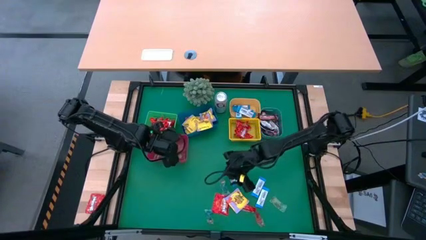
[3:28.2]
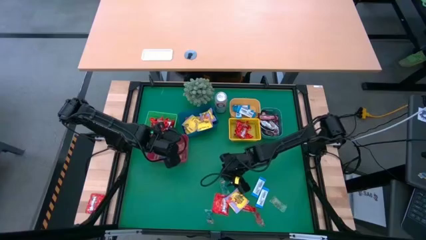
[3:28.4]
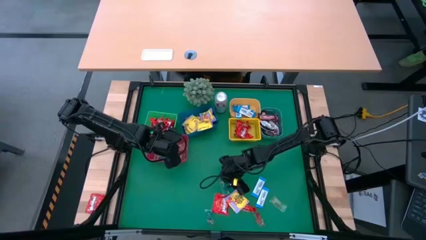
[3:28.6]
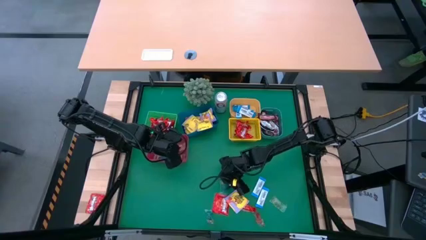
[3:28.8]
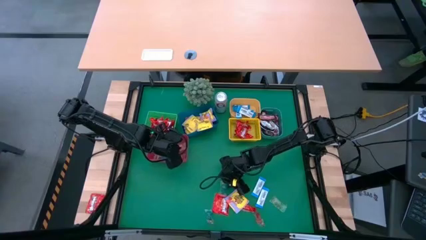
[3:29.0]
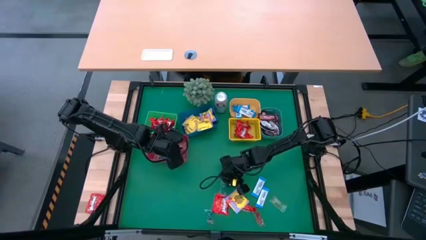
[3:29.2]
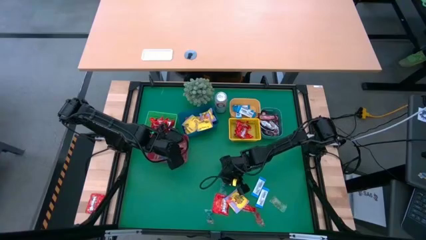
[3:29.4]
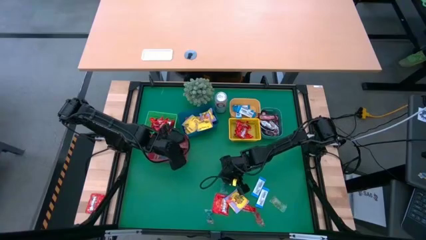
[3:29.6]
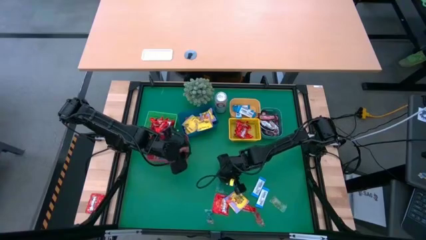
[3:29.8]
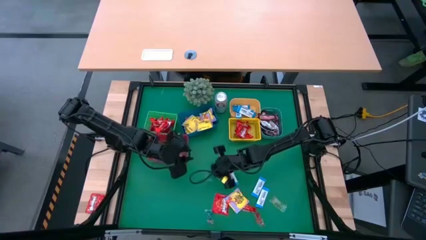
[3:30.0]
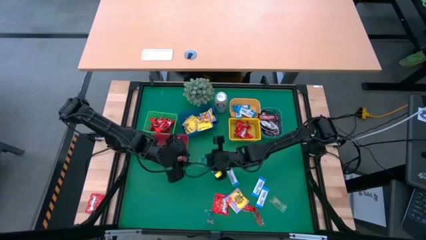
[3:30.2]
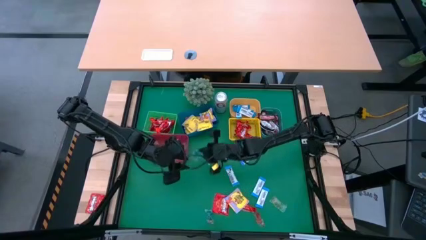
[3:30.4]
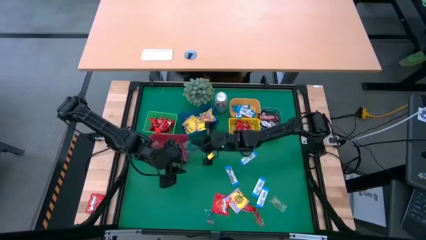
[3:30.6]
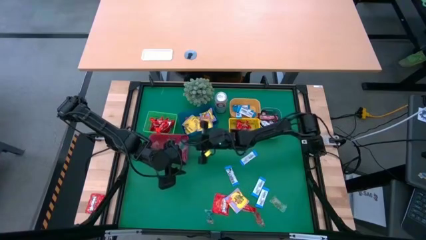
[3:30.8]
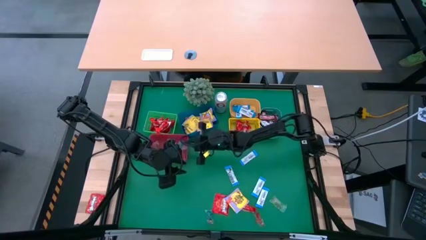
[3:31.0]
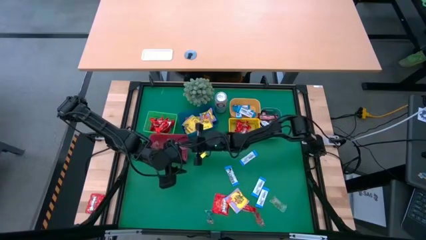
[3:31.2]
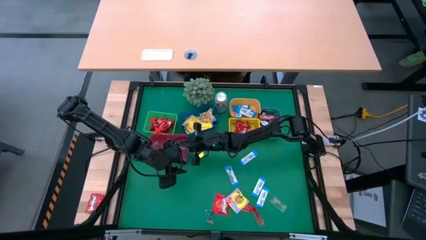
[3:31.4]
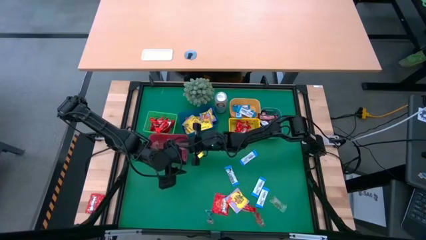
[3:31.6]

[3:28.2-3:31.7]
Task: Sort candy
Put the transparent blue candy pack into the red bin

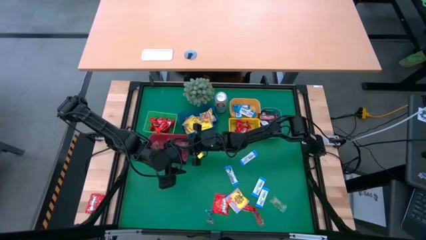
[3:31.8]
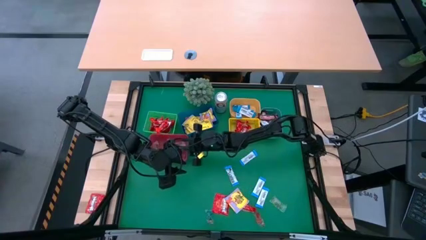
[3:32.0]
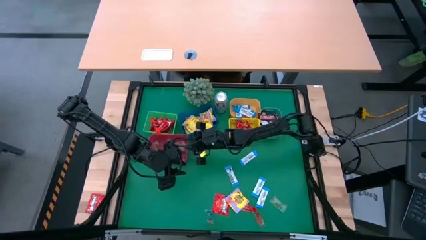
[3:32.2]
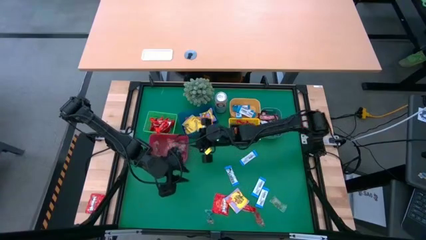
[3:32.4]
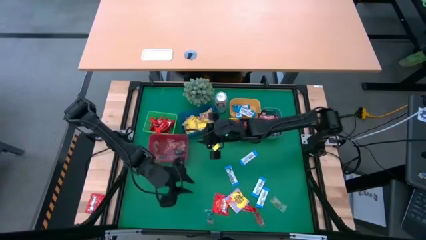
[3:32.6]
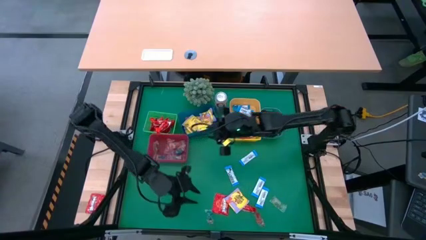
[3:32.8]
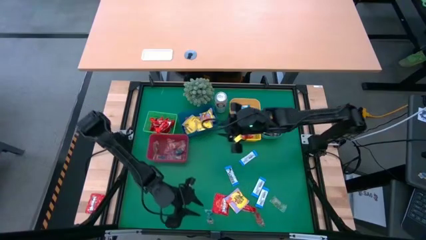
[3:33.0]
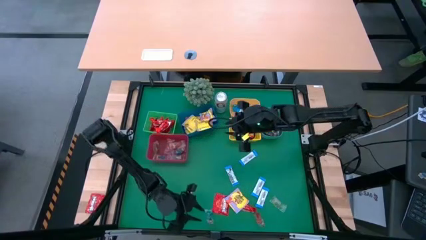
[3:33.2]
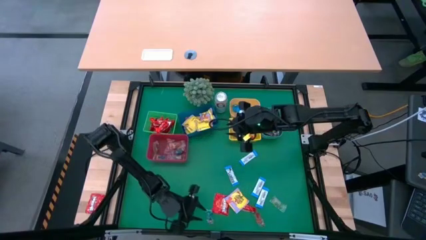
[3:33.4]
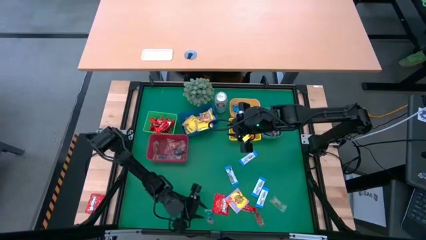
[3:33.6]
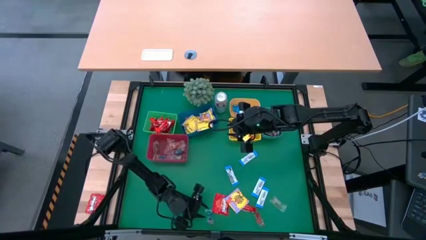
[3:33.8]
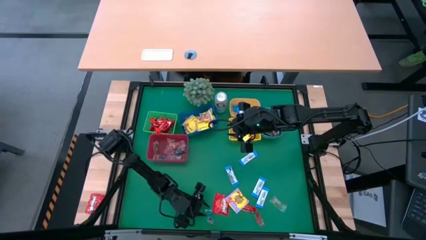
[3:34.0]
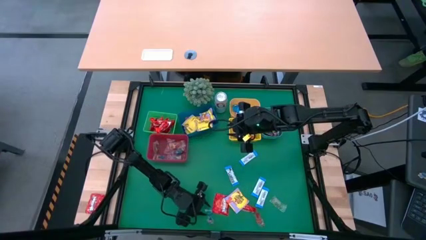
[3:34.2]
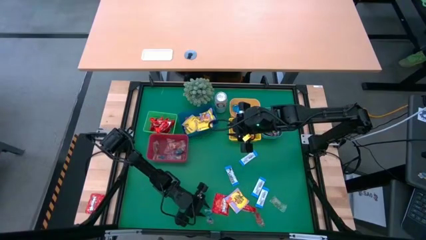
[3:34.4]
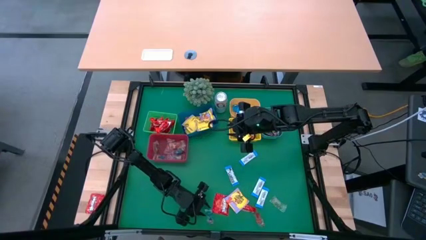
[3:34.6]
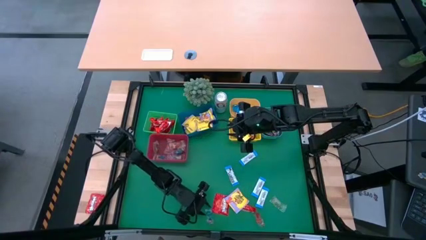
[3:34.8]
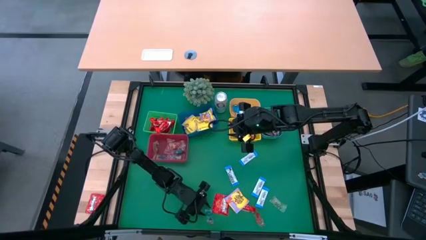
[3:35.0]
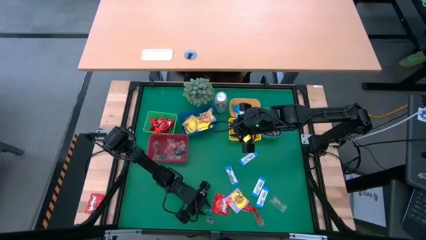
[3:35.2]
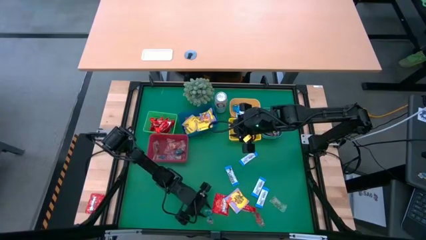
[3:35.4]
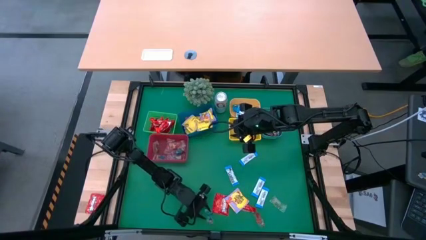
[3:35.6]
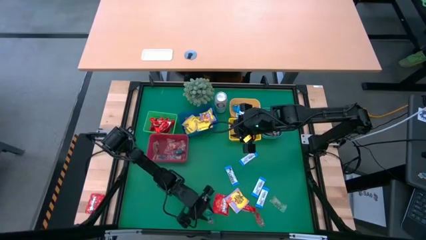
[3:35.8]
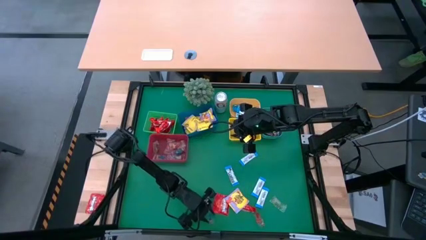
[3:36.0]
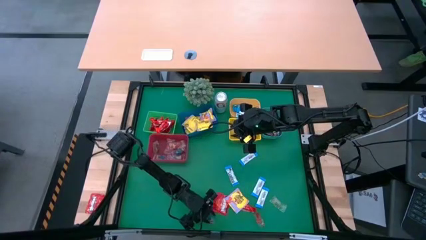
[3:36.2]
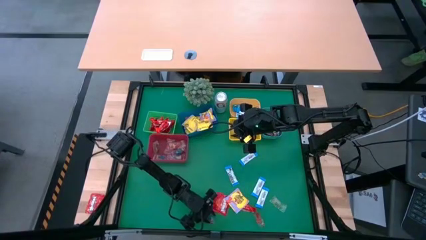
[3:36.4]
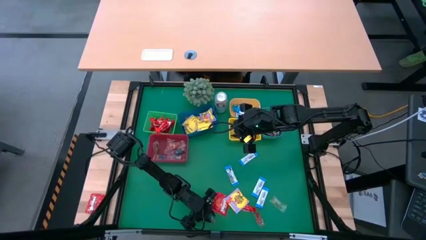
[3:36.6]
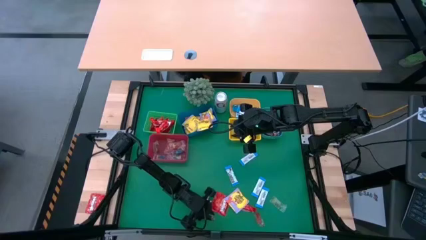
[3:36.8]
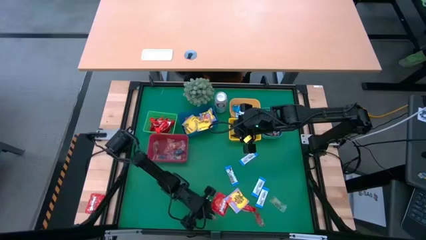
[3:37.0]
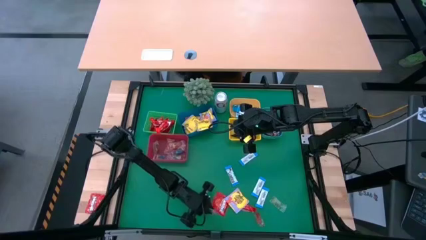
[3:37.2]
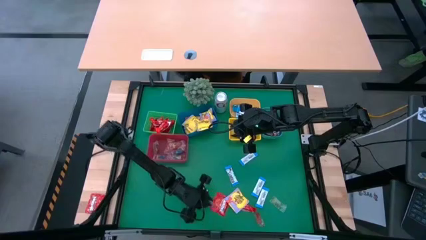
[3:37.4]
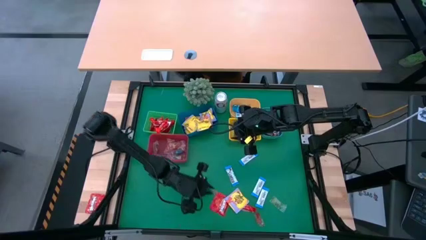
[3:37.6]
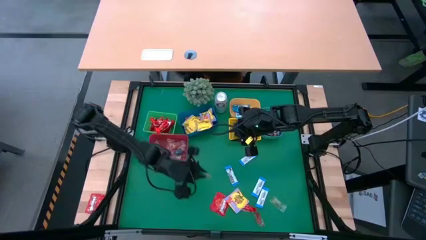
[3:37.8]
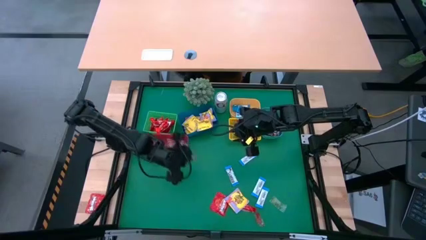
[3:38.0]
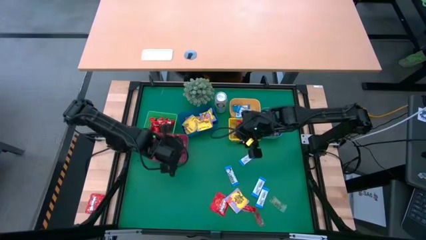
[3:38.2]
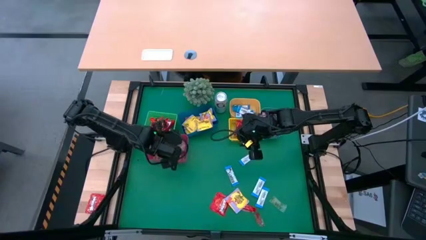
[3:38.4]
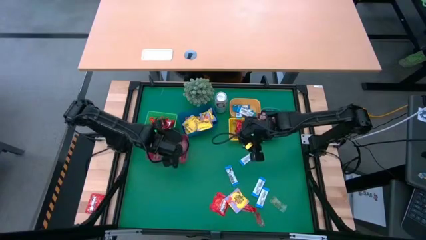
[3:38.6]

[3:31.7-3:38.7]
Put the transparent blue candy pack into the red bin

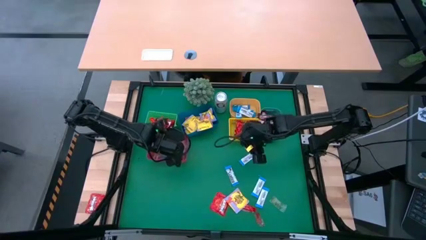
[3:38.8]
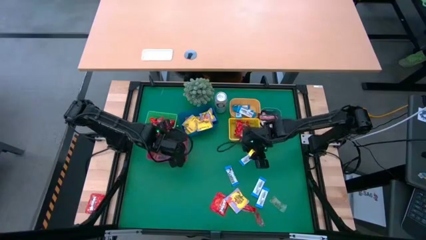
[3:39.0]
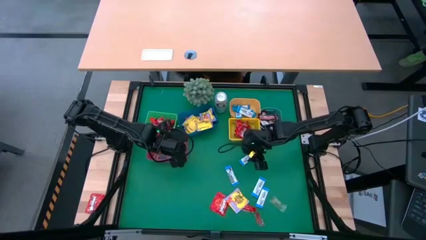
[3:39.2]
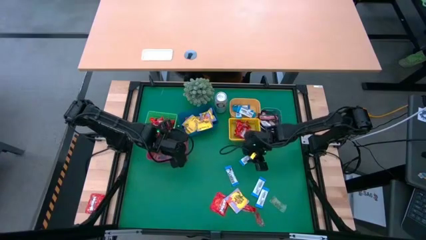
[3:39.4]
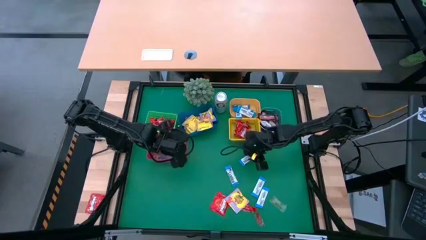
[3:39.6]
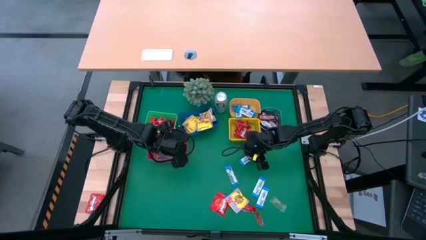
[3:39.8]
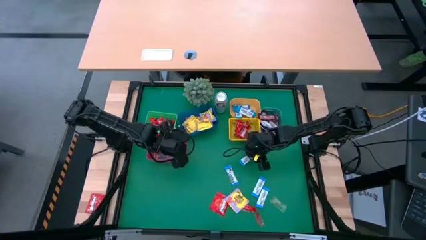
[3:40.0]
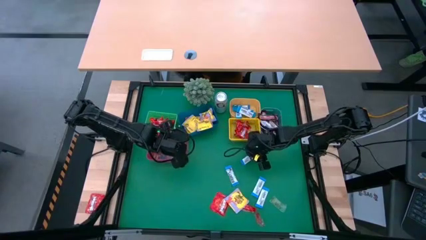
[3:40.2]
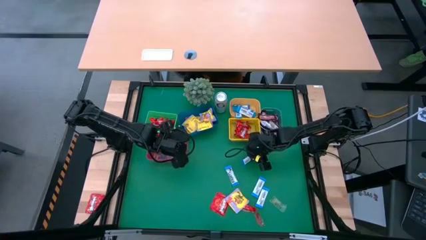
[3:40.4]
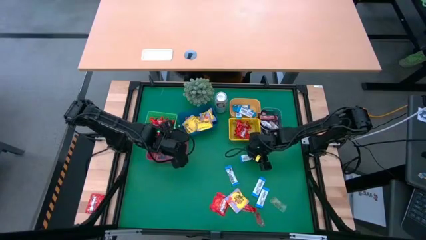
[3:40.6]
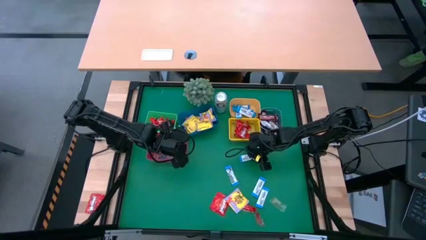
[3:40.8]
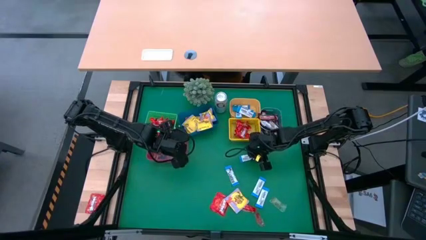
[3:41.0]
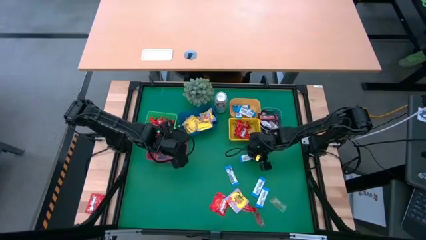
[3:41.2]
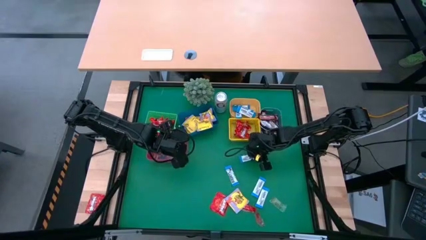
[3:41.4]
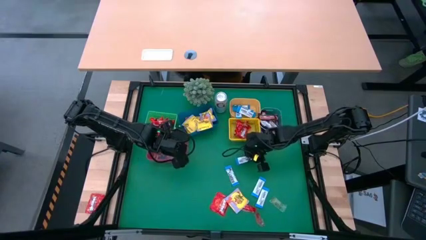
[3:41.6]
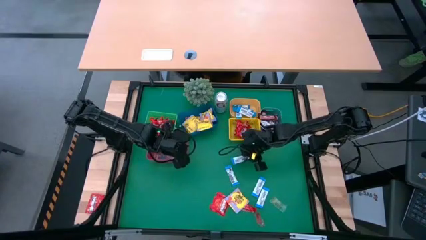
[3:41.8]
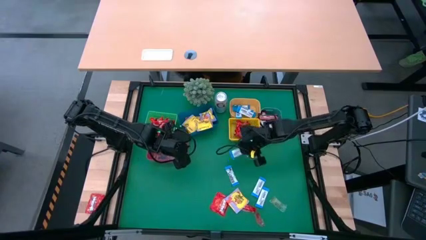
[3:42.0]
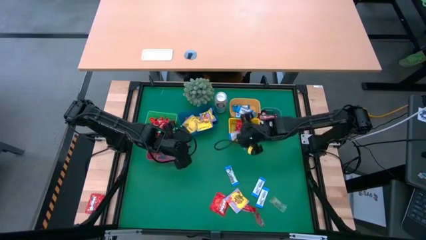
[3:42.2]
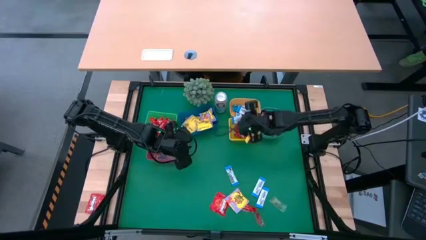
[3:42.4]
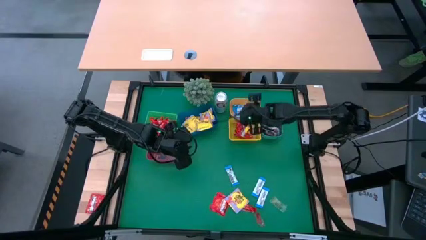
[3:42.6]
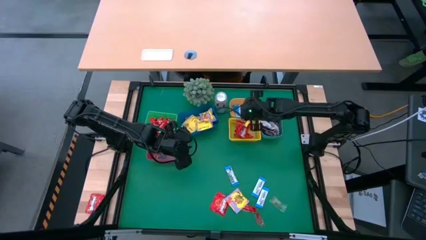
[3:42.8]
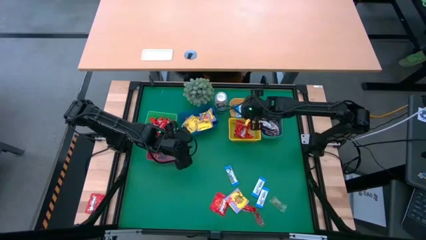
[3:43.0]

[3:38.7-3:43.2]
Put the blue chocolate bar into the orange bin
